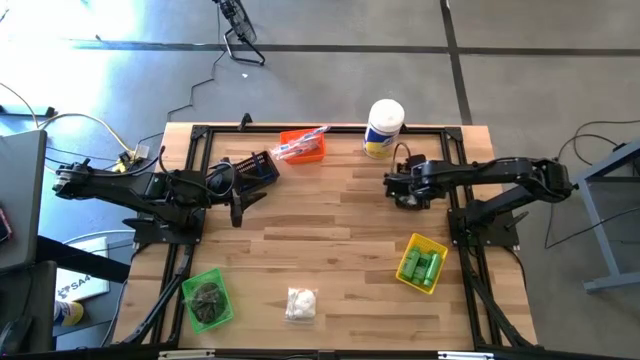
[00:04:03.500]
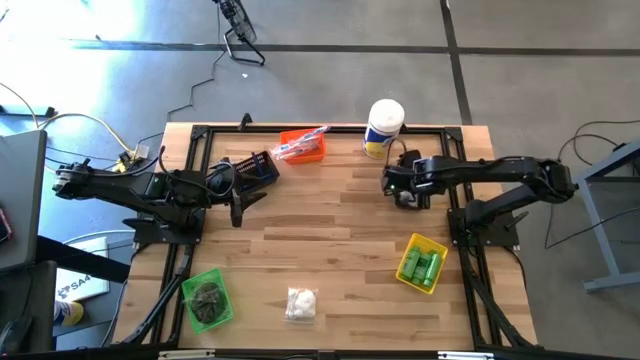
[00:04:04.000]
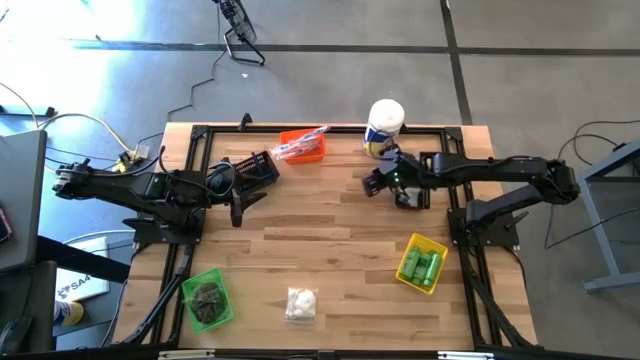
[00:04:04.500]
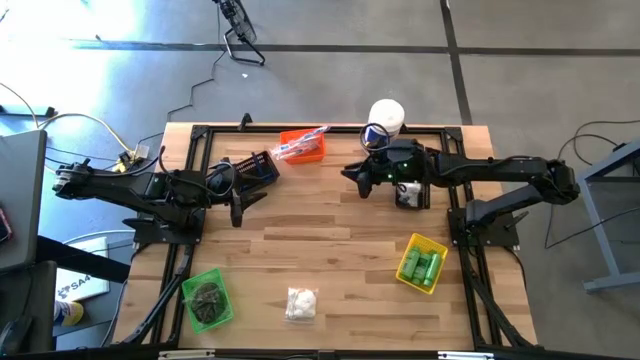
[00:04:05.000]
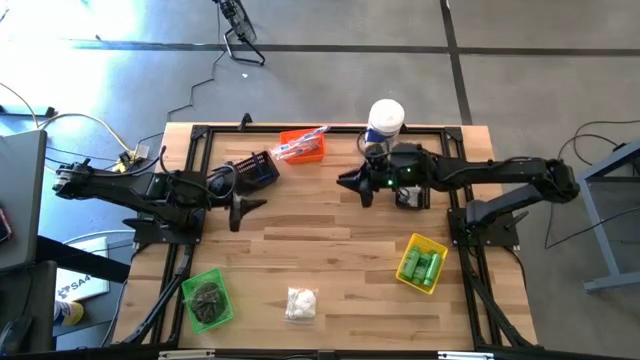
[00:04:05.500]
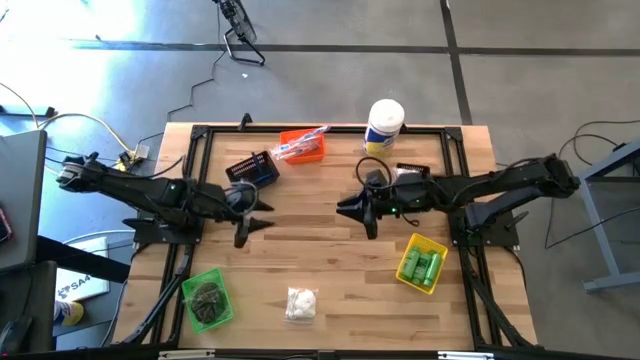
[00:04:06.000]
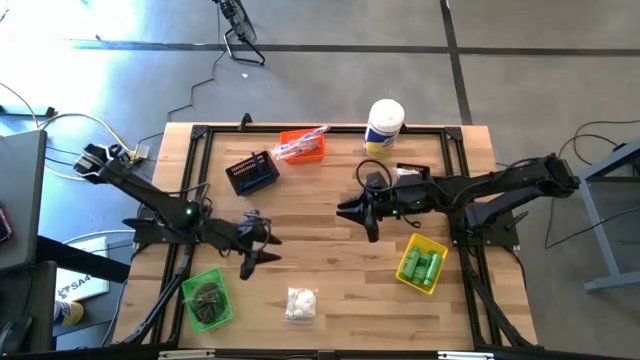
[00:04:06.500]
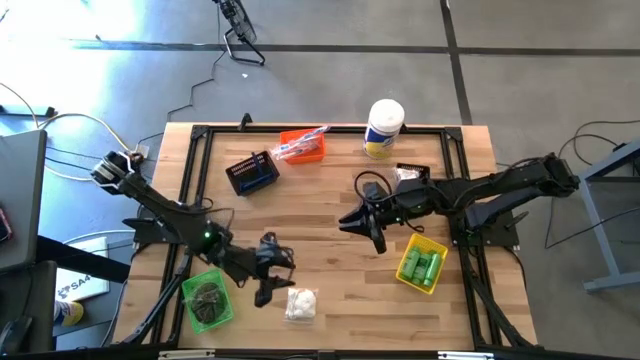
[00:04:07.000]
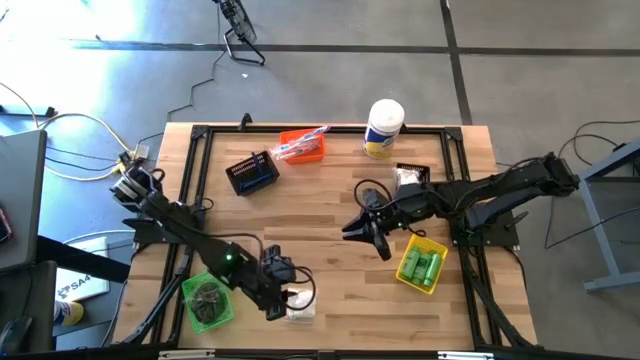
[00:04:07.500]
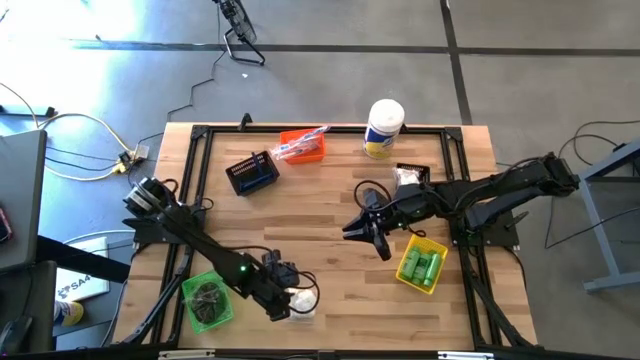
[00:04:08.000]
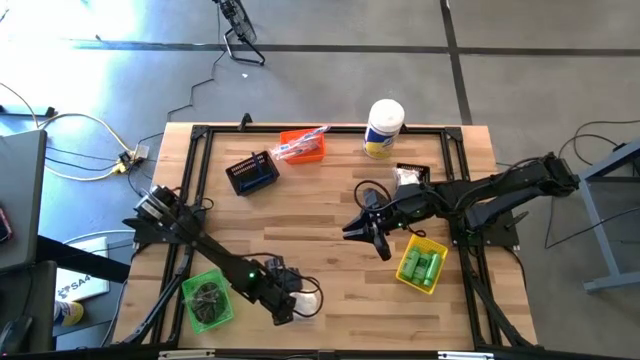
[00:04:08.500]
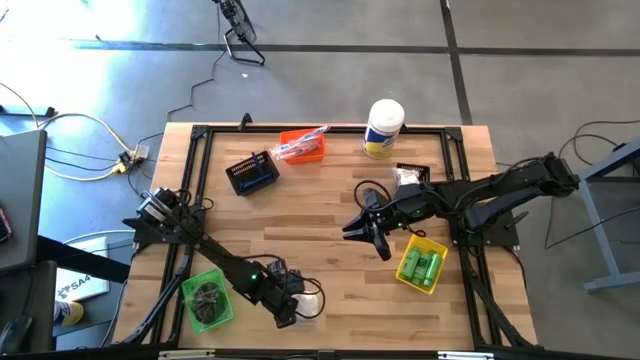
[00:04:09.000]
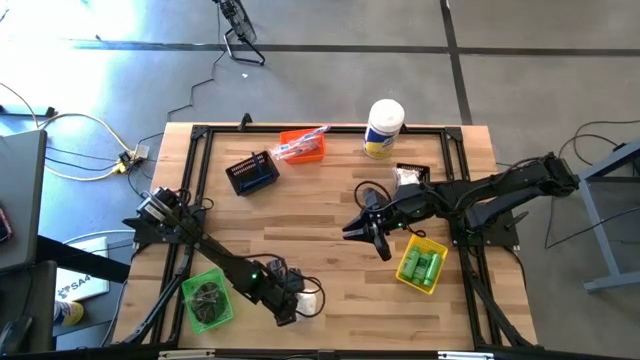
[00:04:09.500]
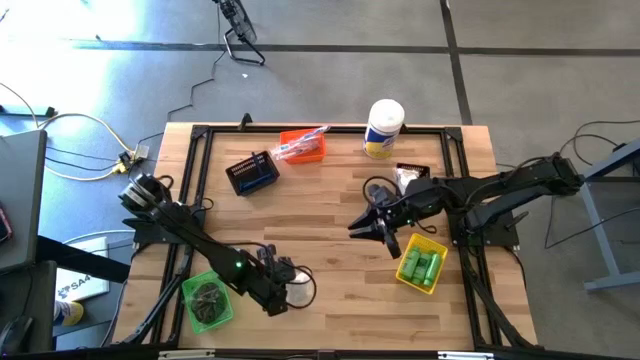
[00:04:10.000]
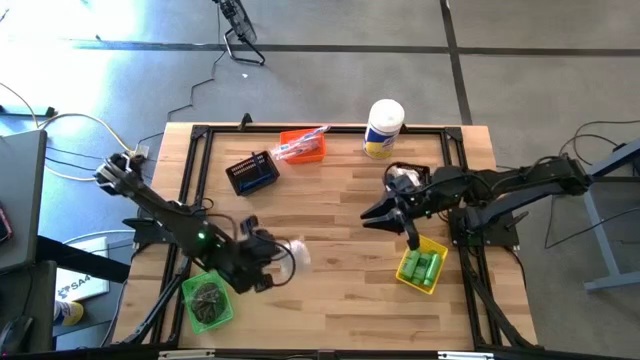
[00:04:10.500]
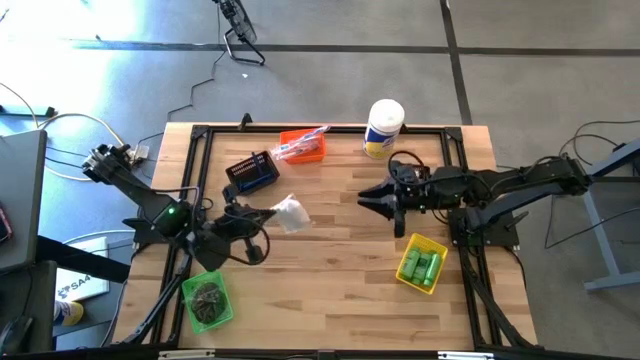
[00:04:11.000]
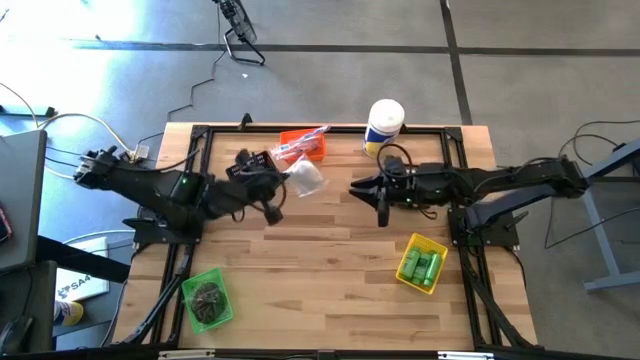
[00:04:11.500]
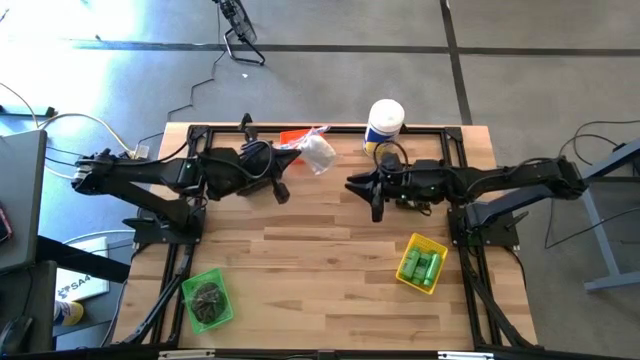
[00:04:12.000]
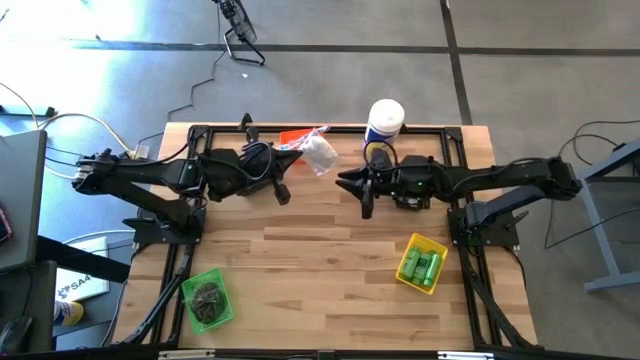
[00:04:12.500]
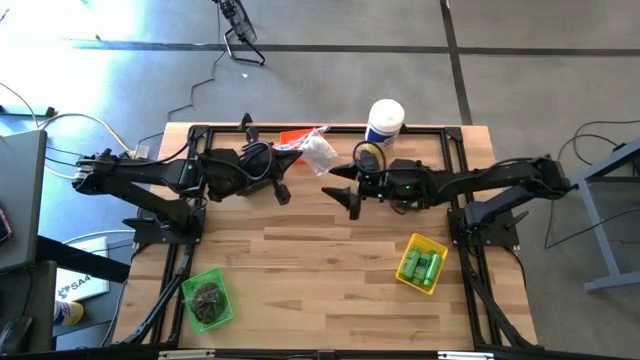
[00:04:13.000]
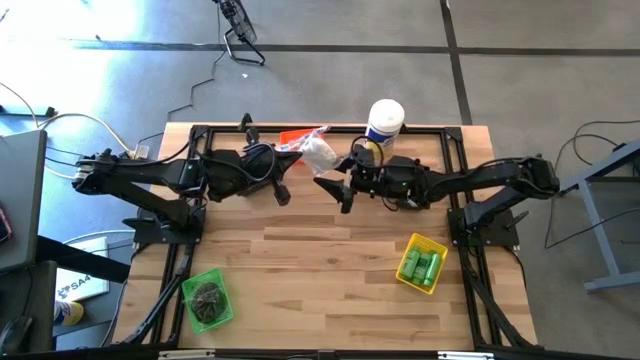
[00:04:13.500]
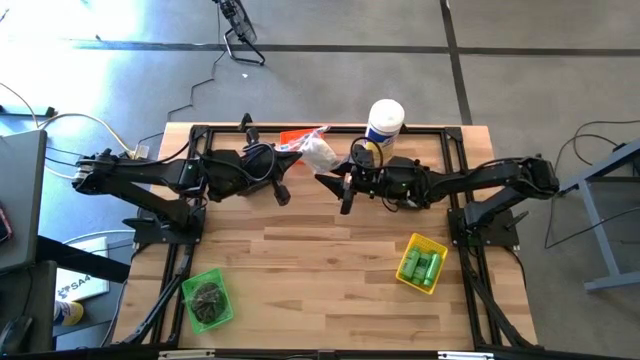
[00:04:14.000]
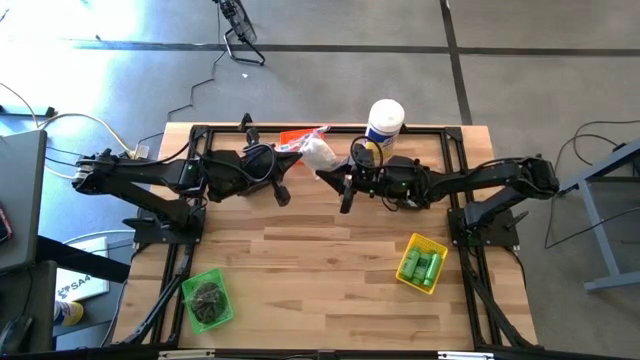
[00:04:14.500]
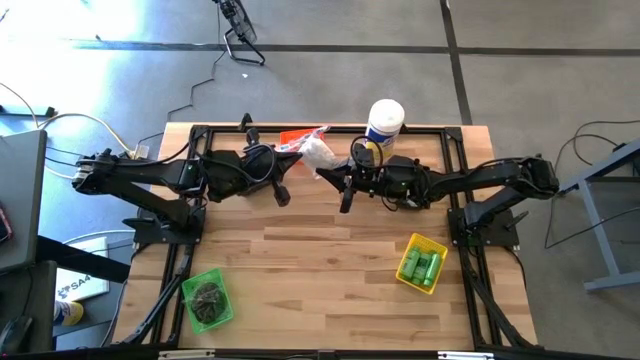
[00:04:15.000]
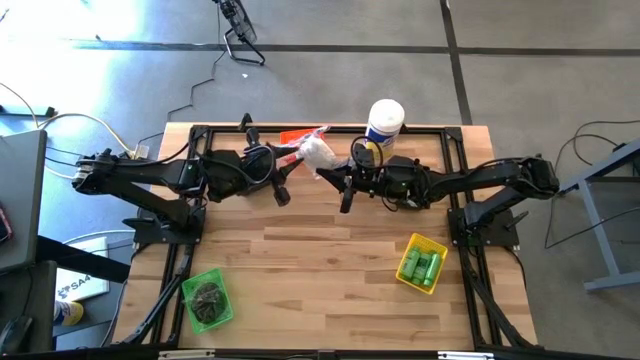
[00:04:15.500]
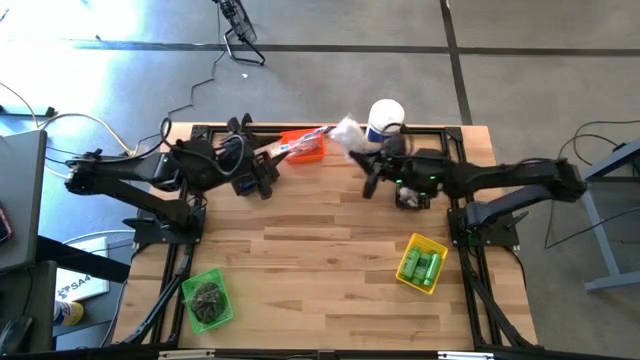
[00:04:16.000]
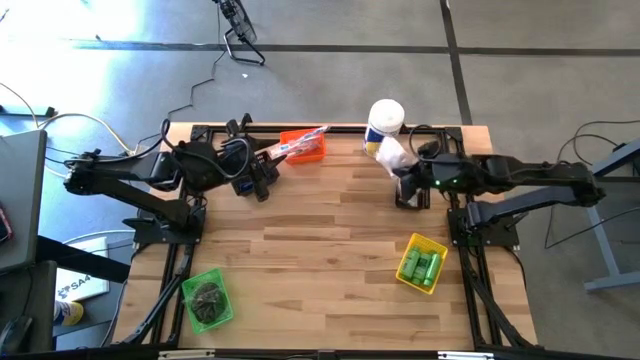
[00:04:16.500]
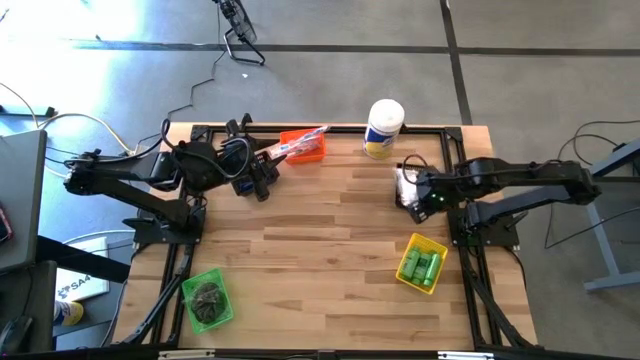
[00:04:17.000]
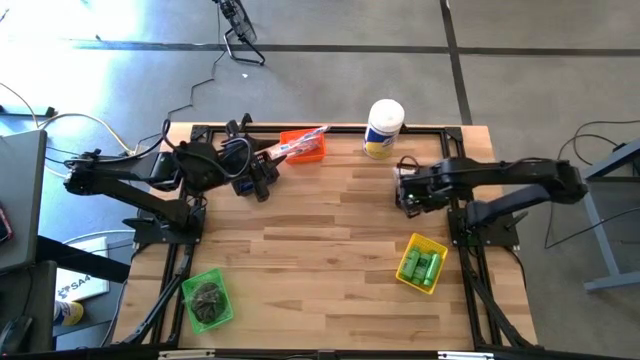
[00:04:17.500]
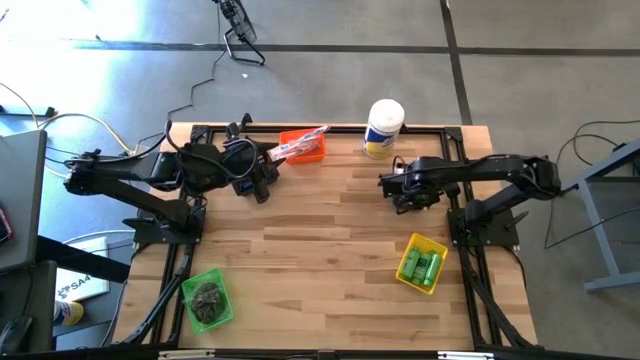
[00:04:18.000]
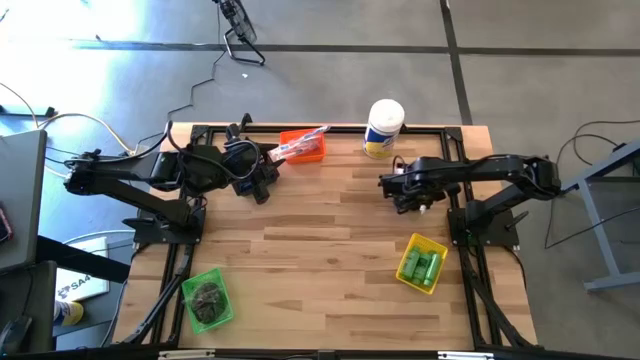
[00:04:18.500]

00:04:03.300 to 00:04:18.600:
Task: Pick & Place Travel size toiletries
Put the white cotton pack into the right black bin

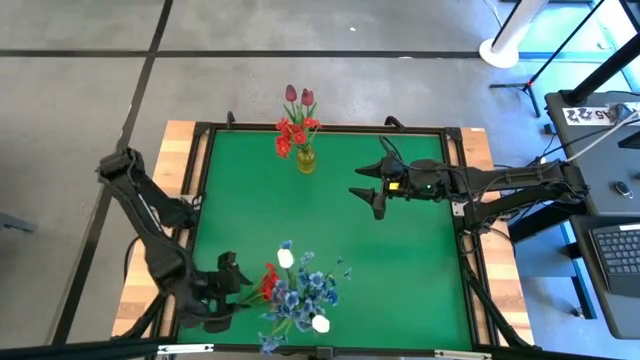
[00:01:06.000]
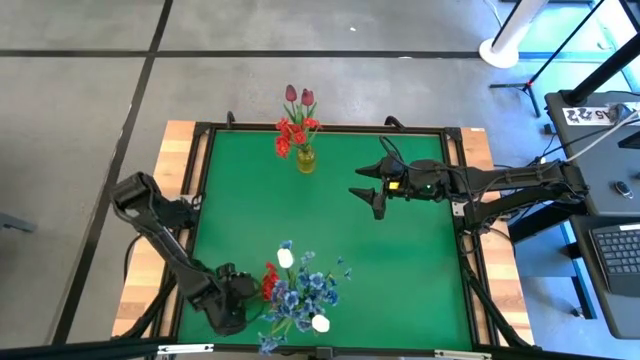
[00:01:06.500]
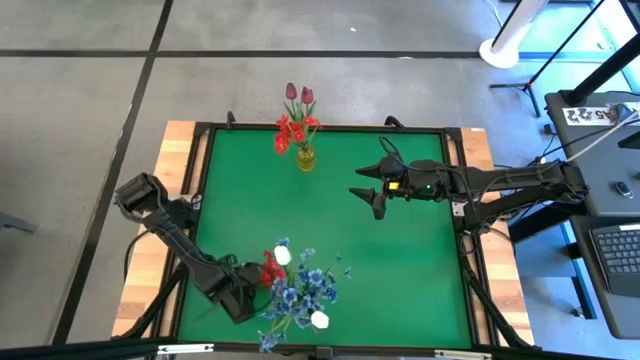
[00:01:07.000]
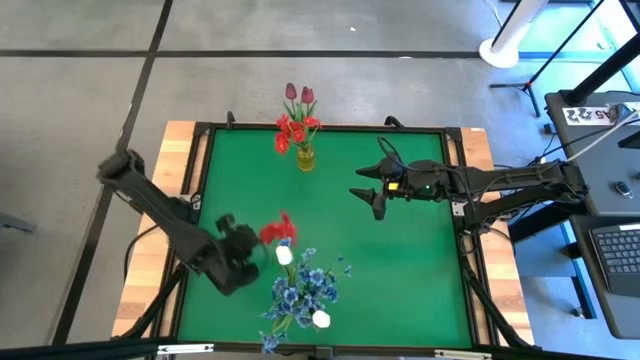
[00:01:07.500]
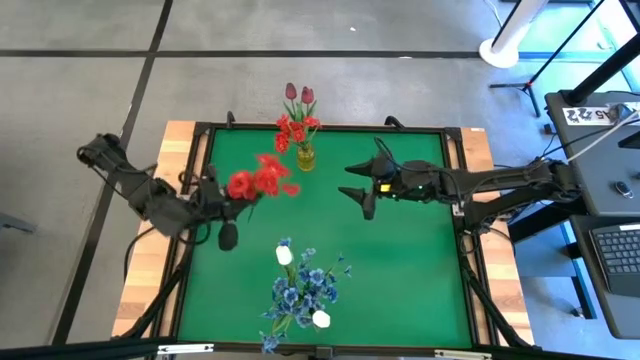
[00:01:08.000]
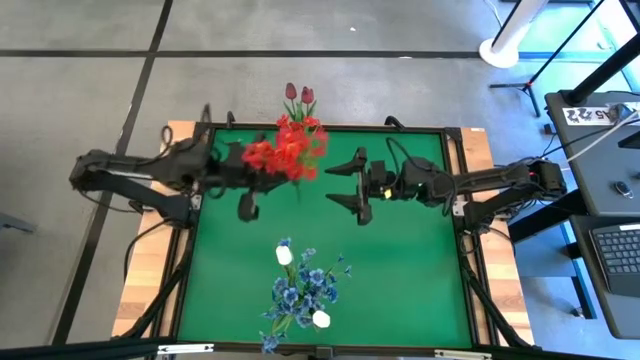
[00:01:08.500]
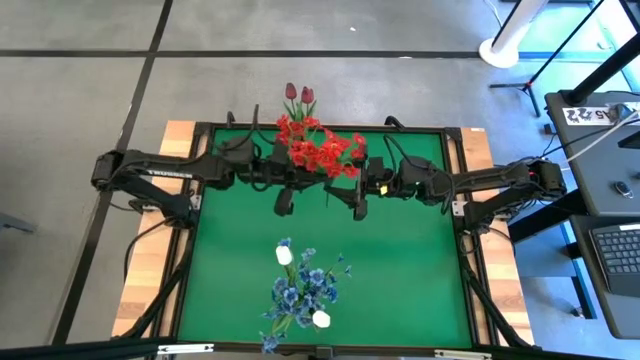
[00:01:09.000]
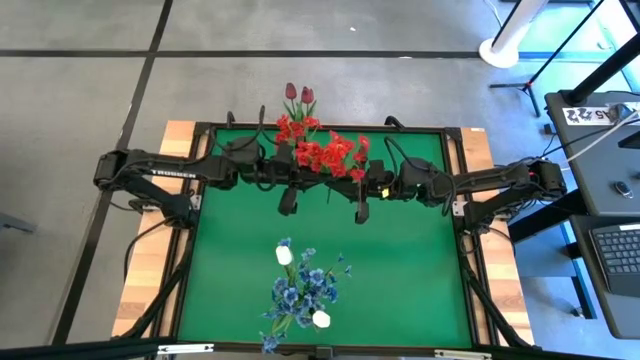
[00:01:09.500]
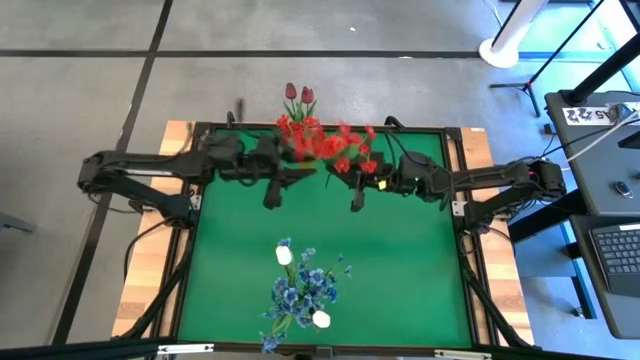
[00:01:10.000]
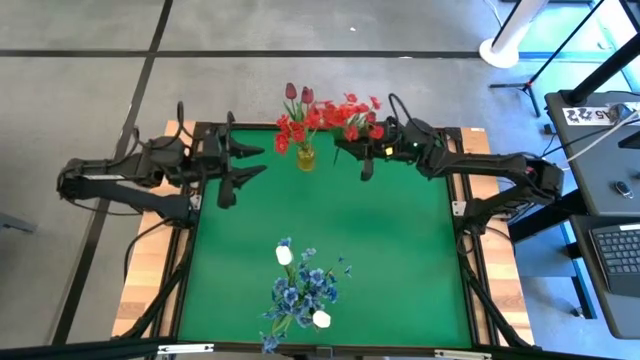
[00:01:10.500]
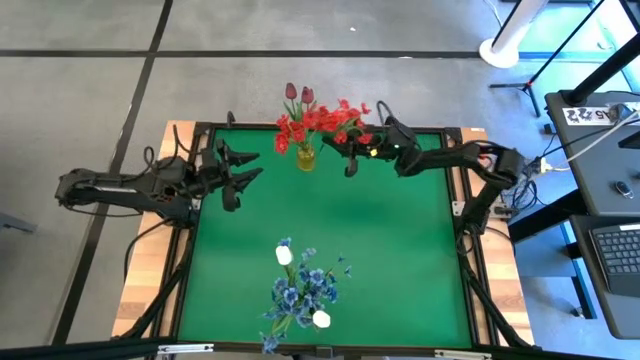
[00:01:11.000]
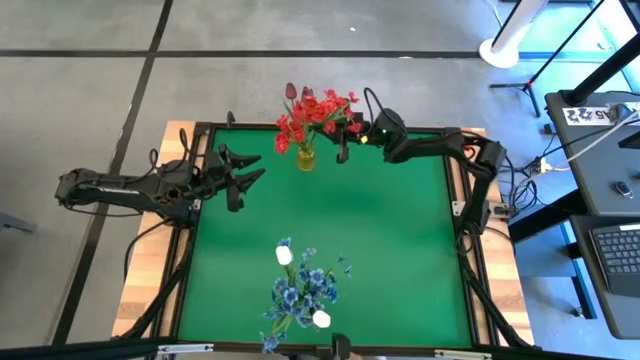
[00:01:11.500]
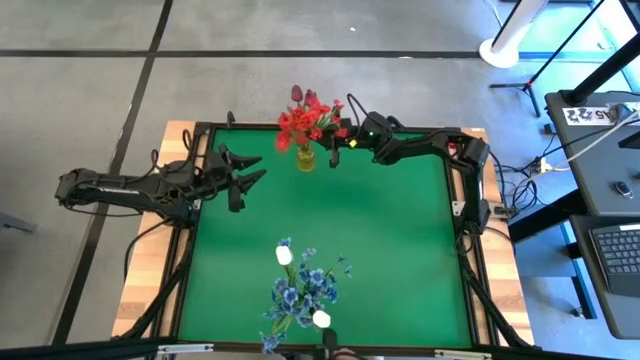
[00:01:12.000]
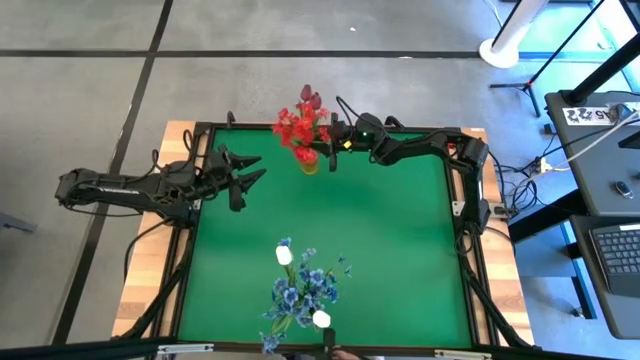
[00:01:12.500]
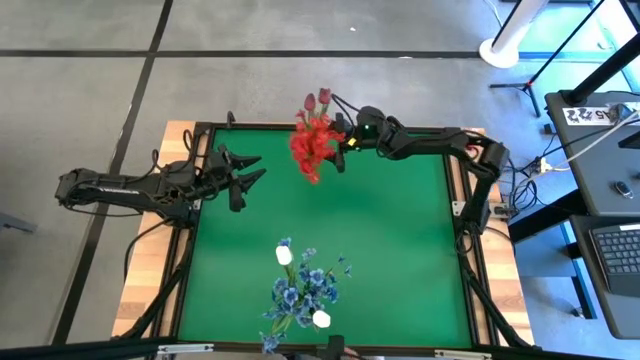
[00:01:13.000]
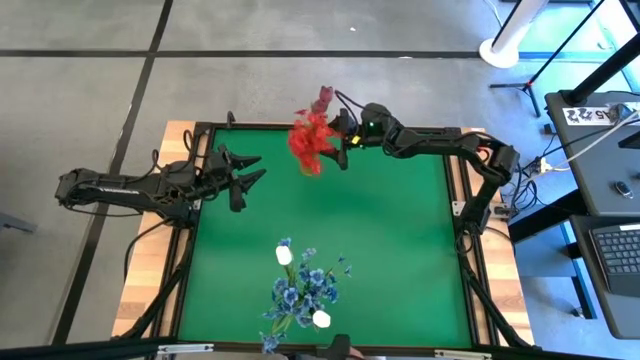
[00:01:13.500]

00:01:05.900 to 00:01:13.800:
Task: Sort flowers into vase by color
Put the red flowers into the yellow vase
